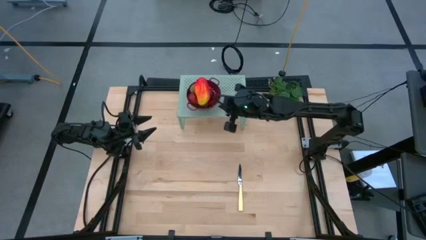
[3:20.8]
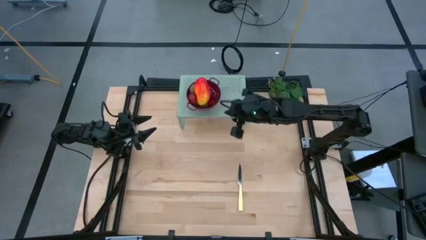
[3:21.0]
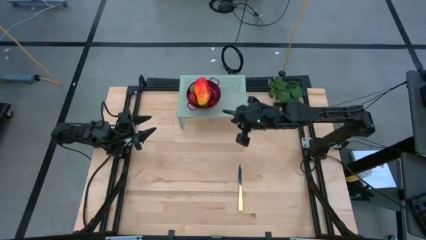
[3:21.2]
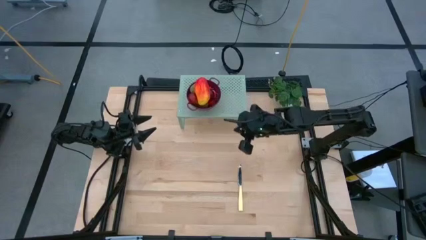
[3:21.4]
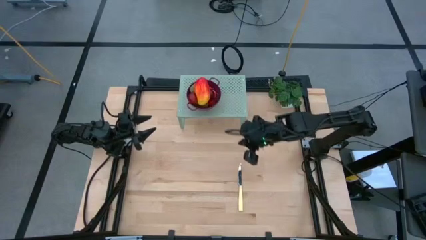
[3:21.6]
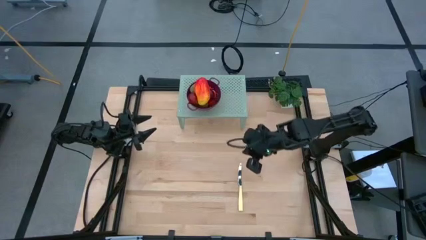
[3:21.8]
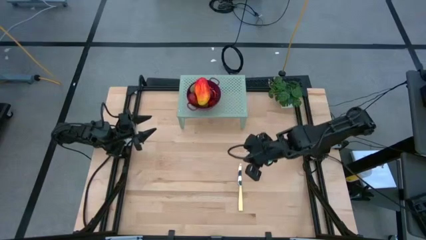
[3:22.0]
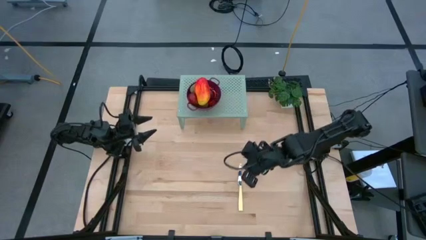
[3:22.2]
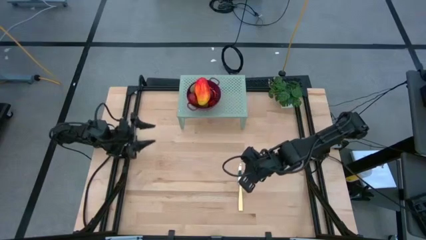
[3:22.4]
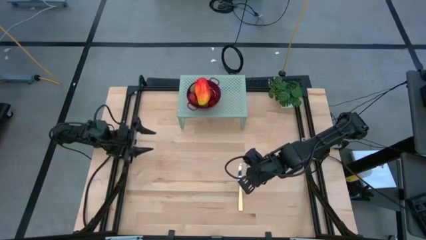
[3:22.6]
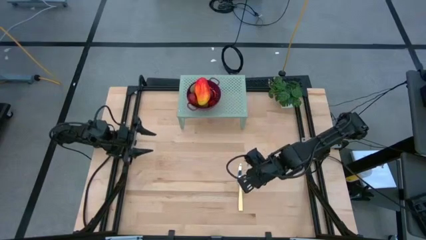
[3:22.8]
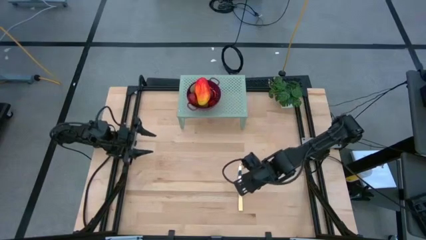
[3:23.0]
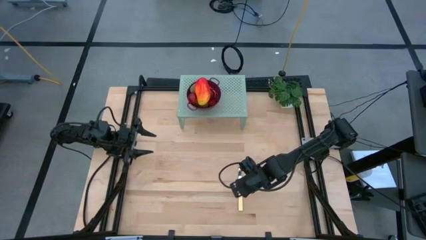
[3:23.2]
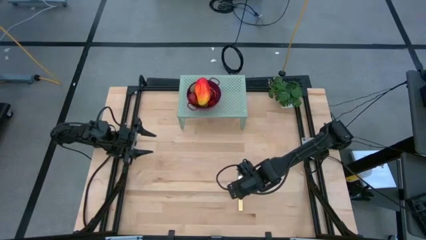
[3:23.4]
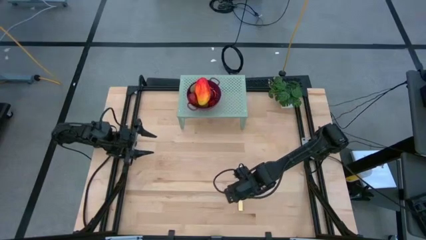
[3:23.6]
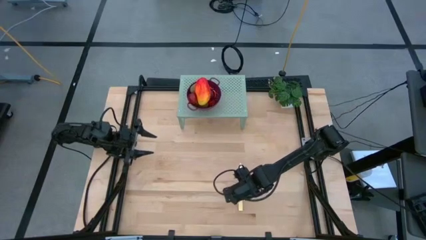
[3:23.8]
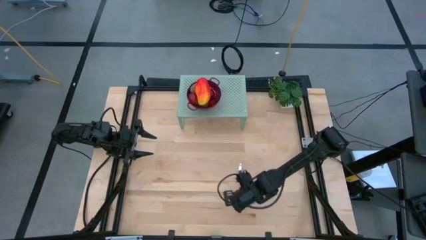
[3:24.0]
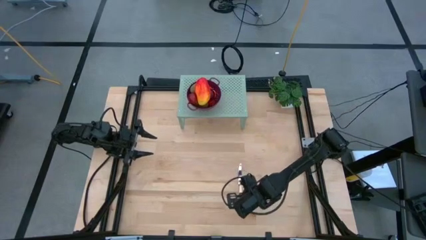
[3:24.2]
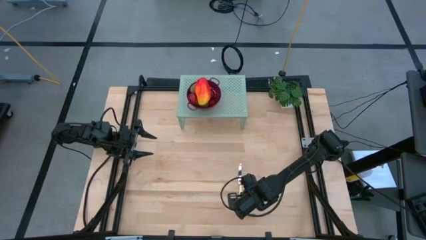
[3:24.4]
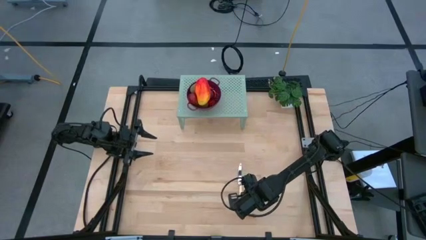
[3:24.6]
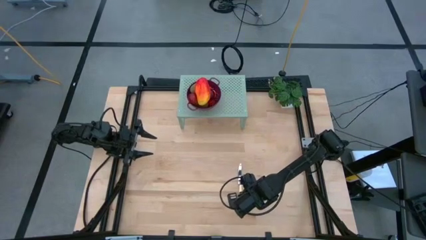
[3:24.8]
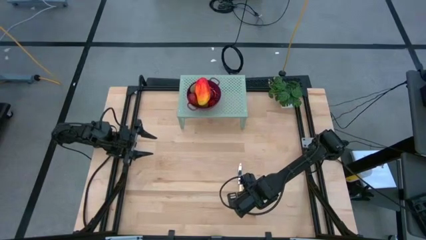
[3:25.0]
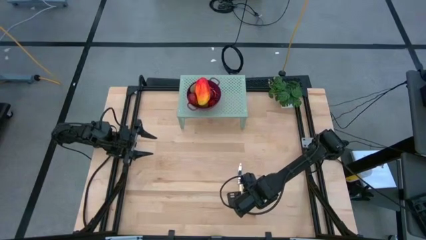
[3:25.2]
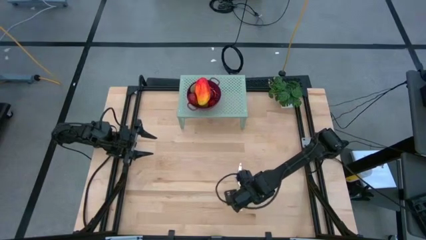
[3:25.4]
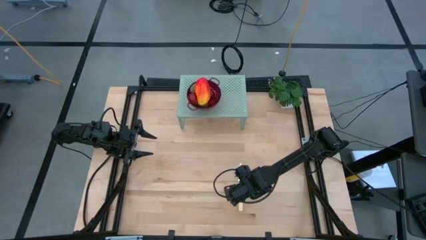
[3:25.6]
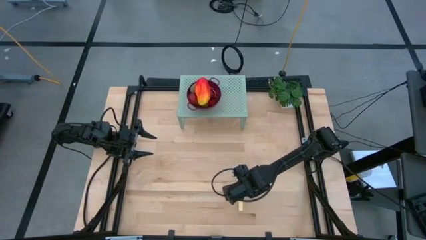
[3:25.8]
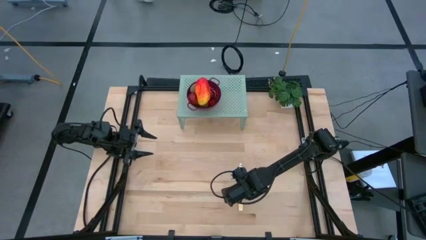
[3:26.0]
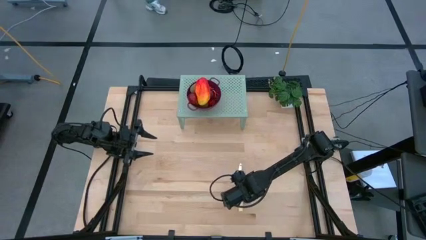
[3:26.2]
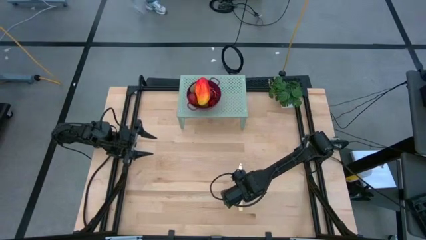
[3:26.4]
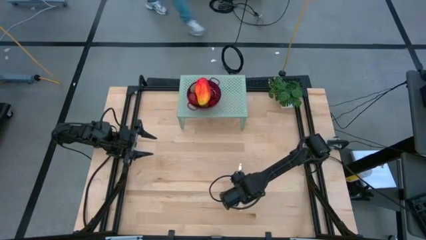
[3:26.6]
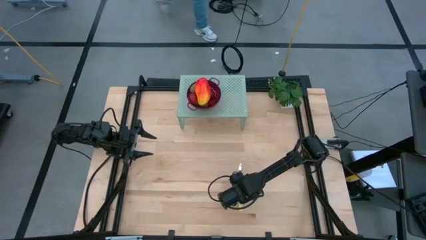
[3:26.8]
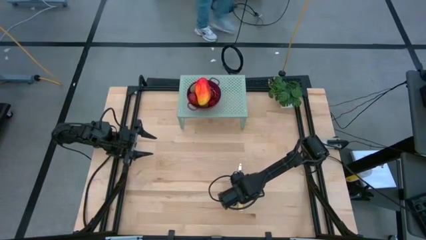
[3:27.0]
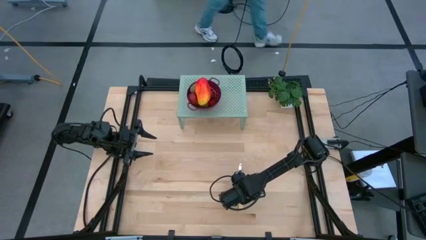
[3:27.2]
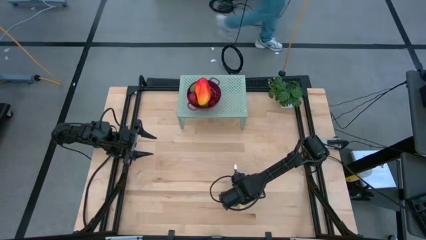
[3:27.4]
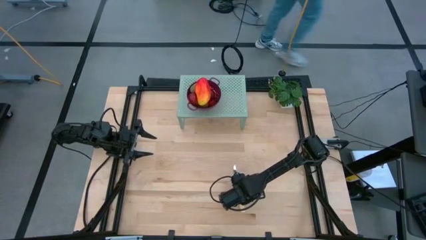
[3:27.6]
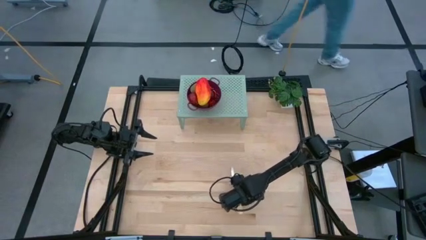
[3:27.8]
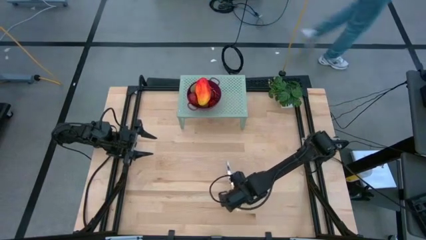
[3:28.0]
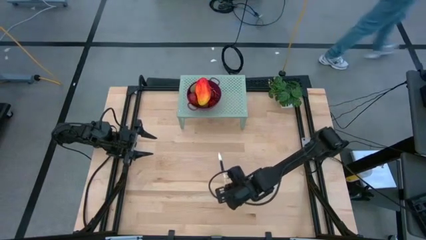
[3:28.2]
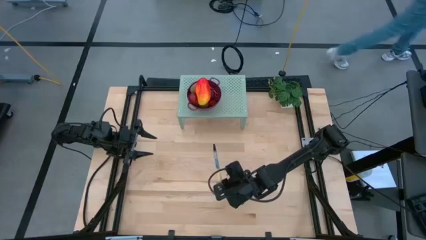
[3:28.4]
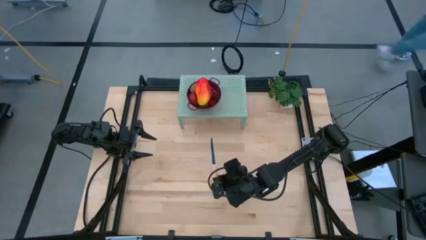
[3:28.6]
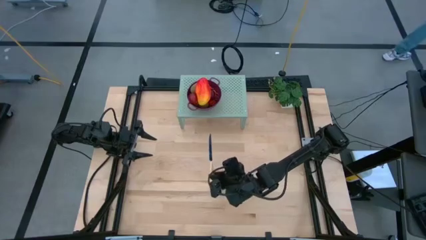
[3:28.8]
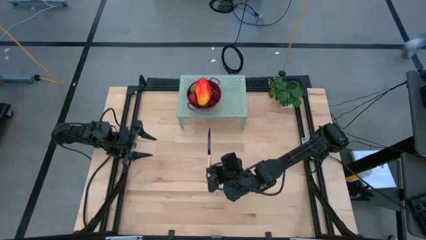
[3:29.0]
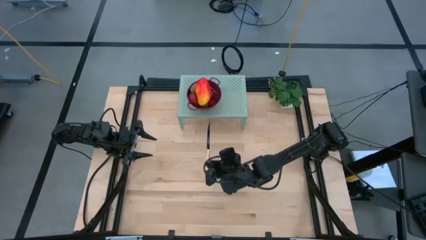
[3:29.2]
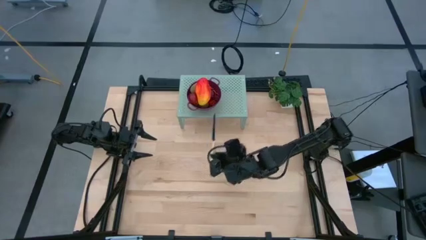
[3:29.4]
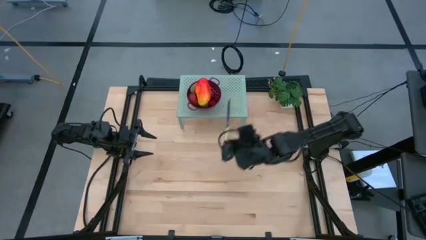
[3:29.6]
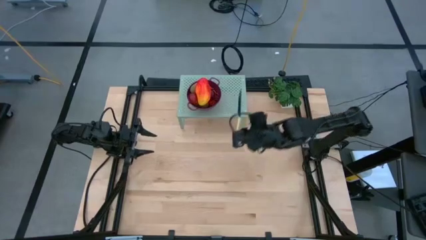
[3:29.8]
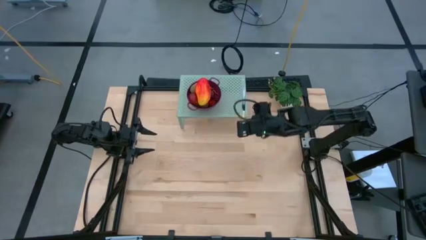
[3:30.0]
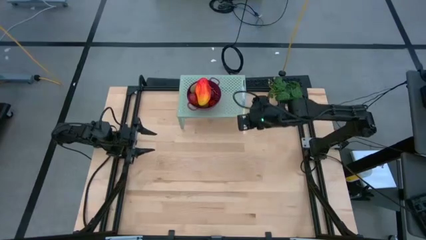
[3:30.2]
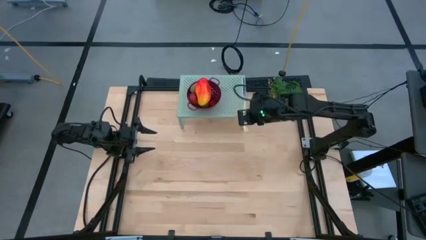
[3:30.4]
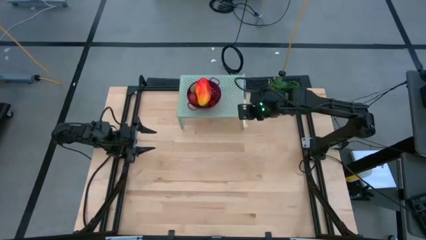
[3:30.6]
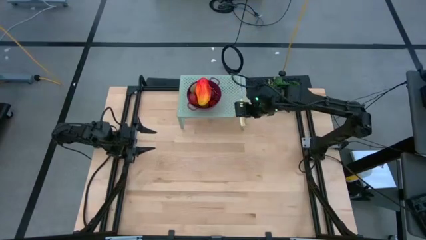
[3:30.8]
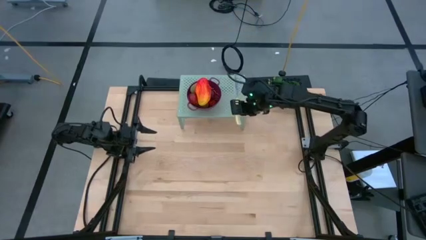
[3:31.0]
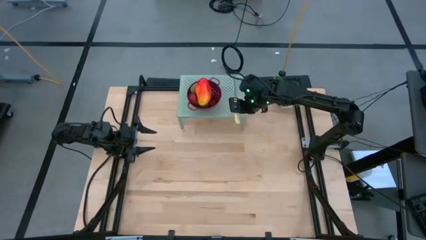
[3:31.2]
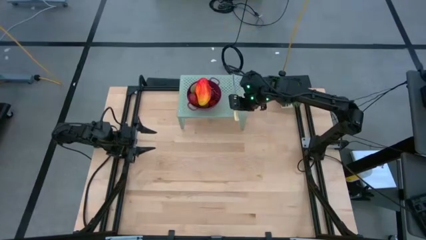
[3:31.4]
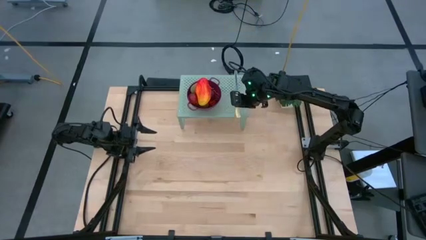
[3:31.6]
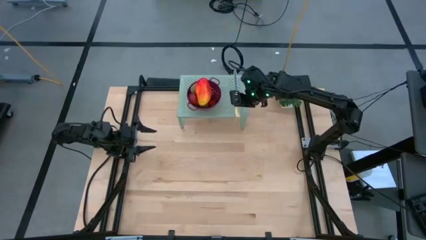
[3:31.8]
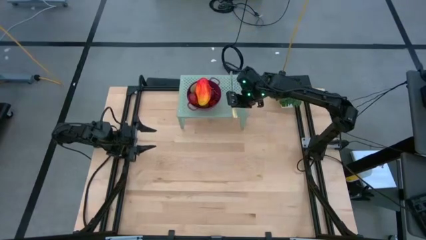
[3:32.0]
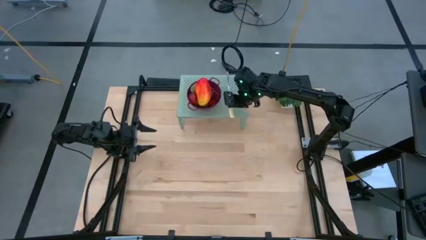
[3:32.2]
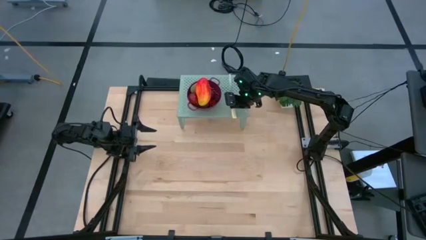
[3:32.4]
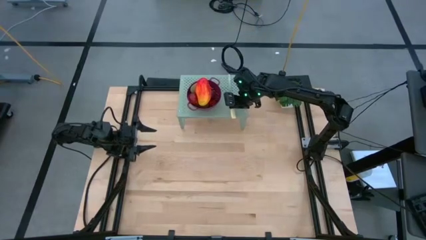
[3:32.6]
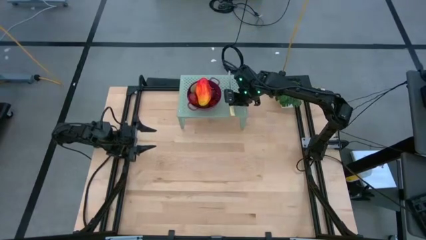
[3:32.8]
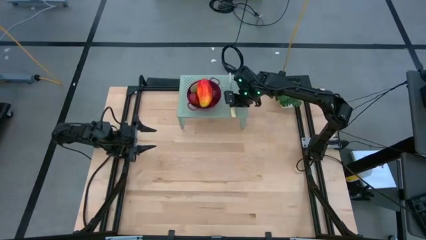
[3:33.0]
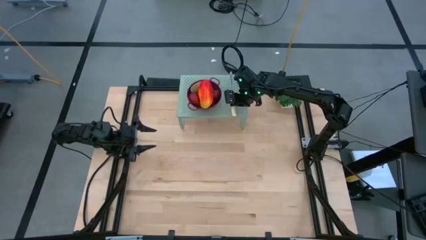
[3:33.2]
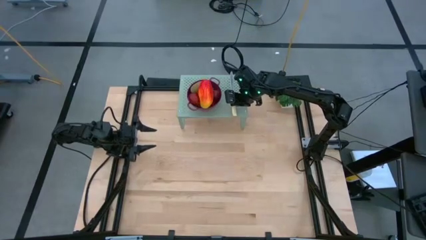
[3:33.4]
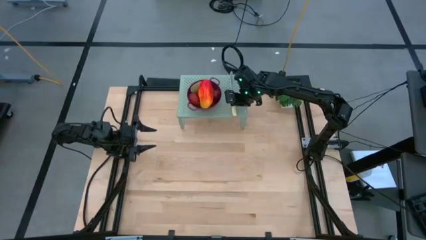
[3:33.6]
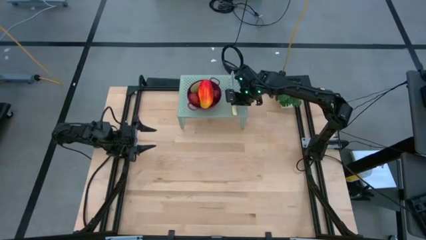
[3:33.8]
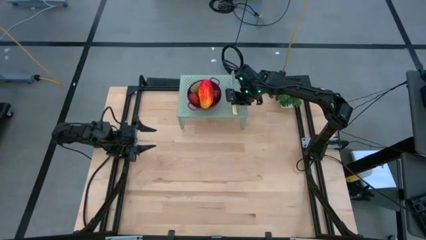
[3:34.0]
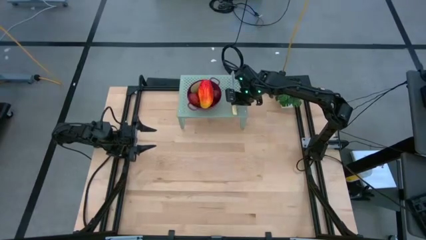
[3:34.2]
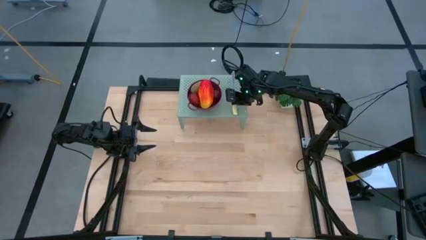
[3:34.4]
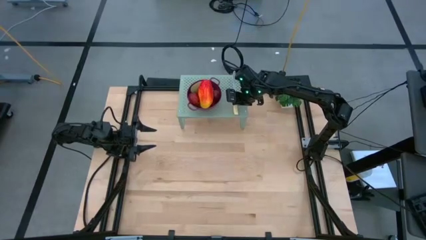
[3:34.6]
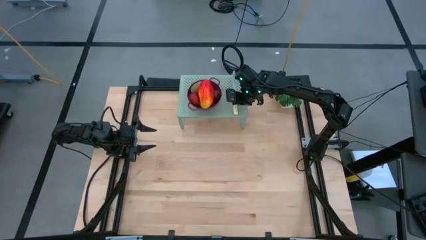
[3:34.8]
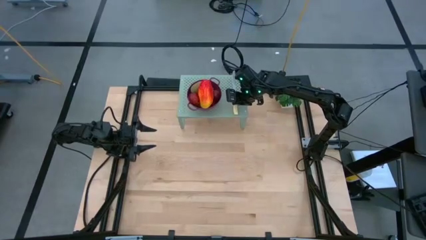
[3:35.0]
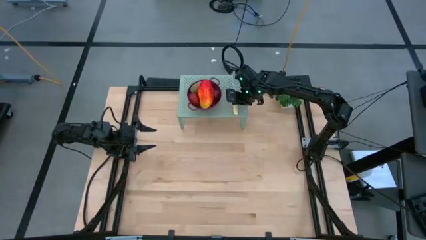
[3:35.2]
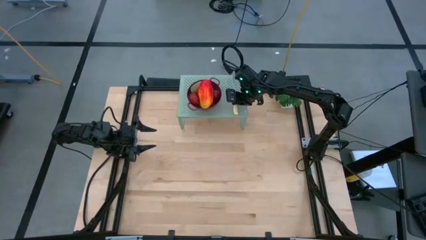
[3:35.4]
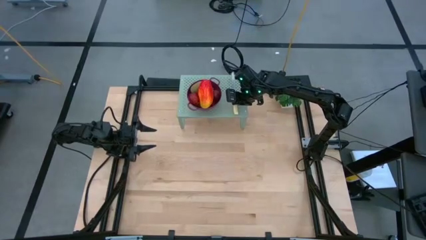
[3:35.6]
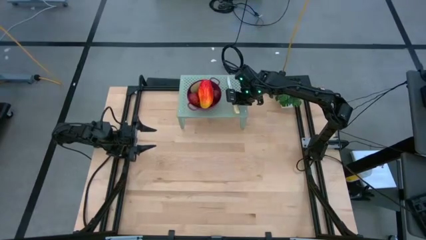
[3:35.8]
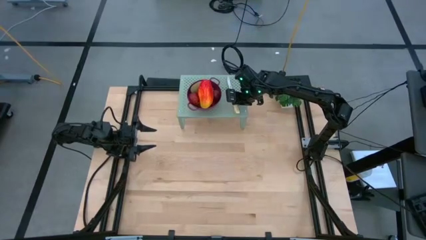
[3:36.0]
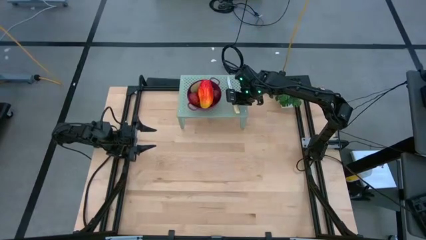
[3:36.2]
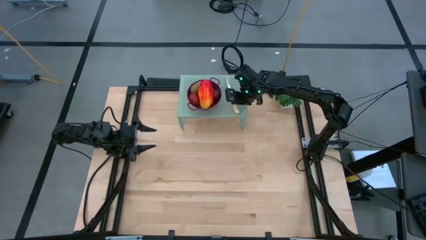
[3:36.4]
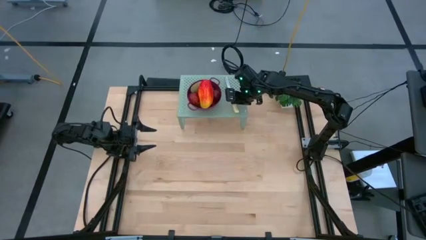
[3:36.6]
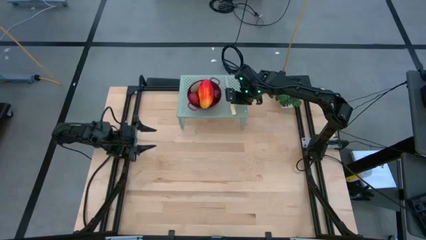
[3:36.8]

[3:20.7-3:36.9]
Task: Pick & Place Fruit
Put the table knife on the shelf
